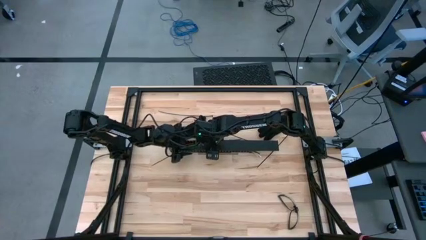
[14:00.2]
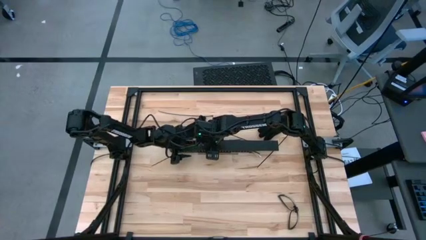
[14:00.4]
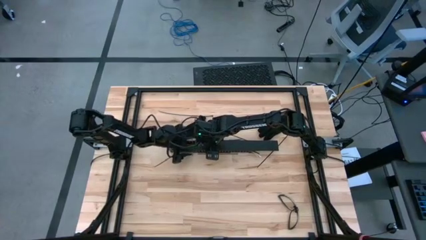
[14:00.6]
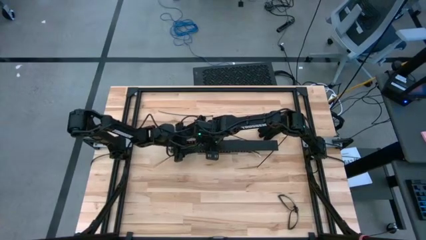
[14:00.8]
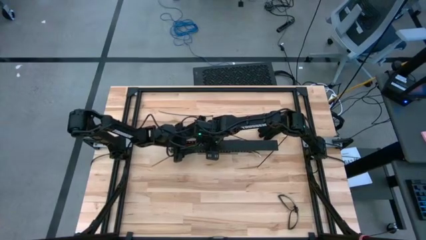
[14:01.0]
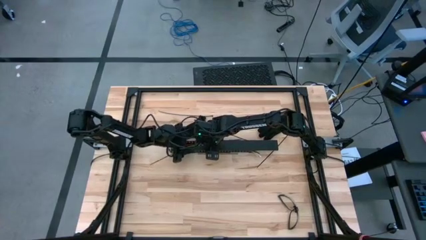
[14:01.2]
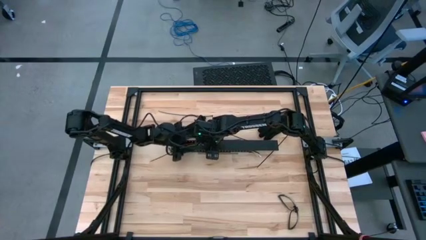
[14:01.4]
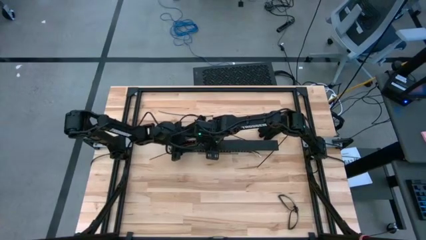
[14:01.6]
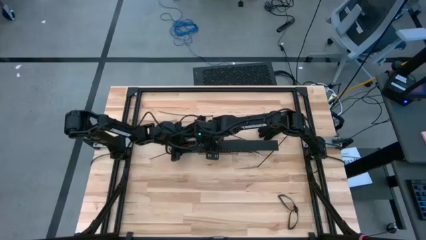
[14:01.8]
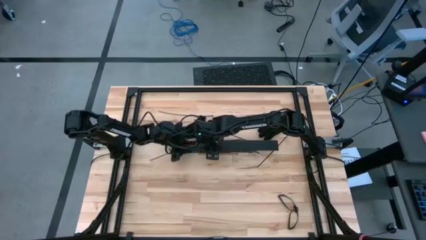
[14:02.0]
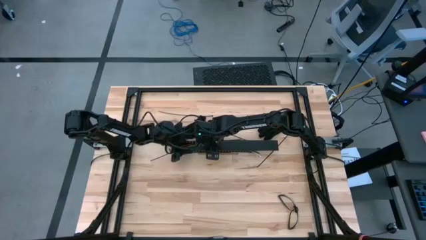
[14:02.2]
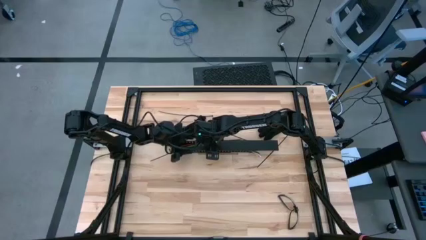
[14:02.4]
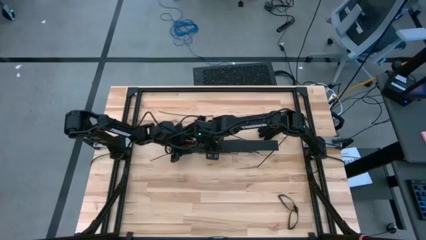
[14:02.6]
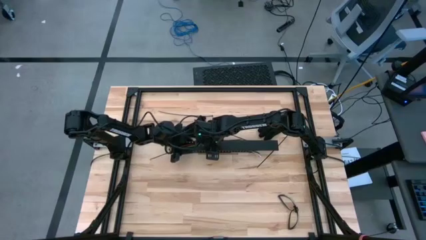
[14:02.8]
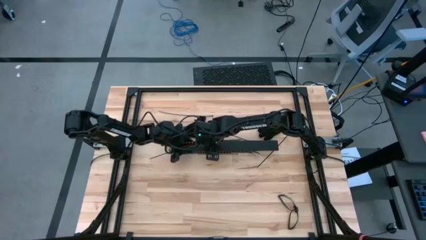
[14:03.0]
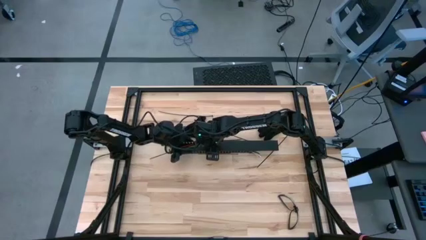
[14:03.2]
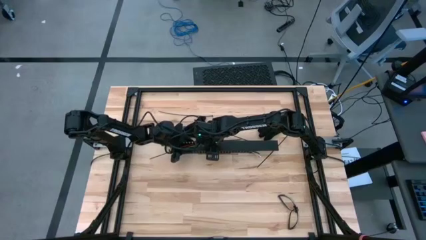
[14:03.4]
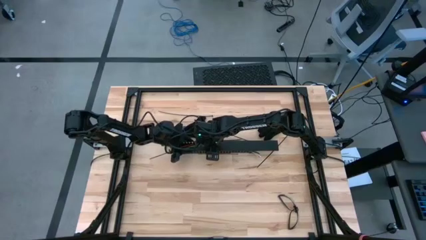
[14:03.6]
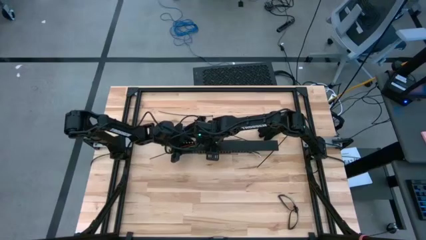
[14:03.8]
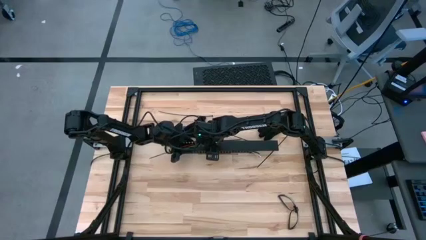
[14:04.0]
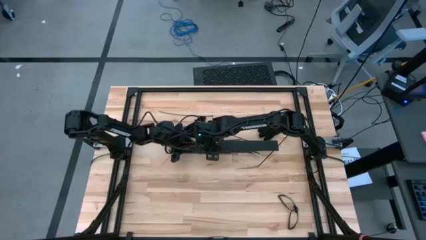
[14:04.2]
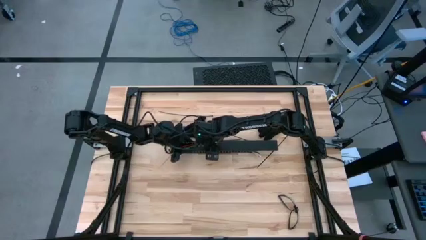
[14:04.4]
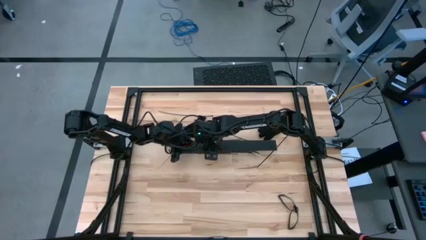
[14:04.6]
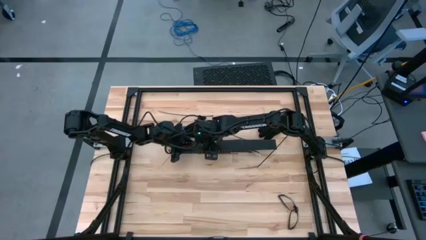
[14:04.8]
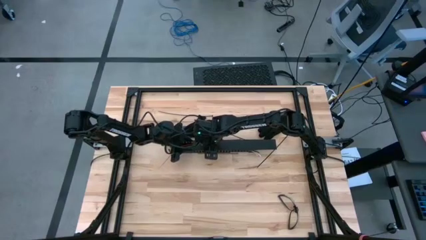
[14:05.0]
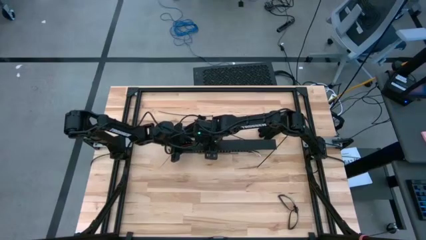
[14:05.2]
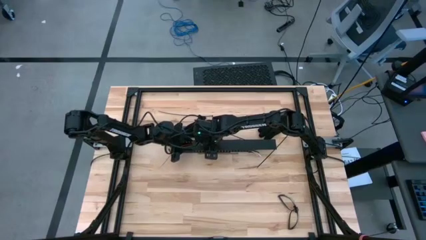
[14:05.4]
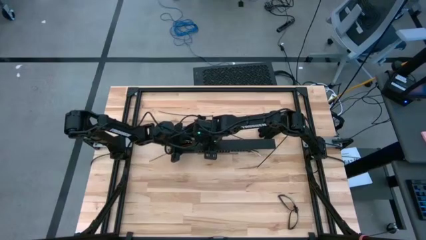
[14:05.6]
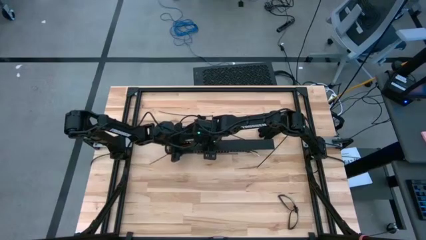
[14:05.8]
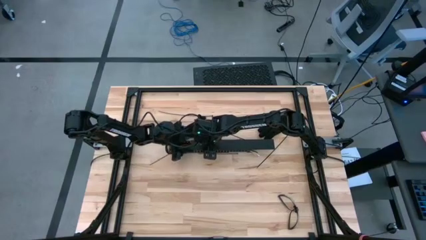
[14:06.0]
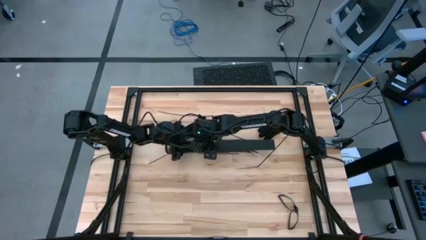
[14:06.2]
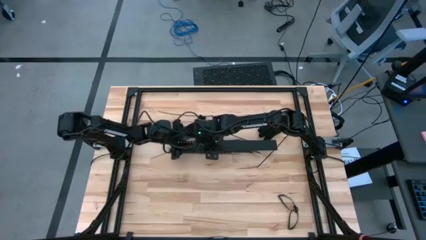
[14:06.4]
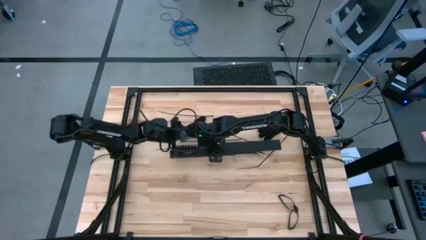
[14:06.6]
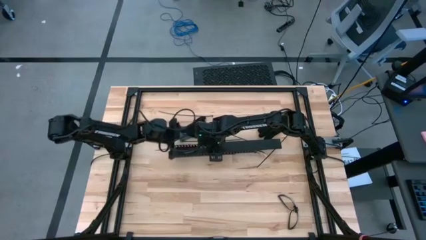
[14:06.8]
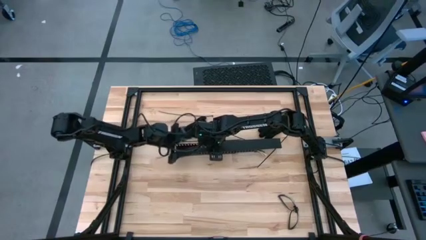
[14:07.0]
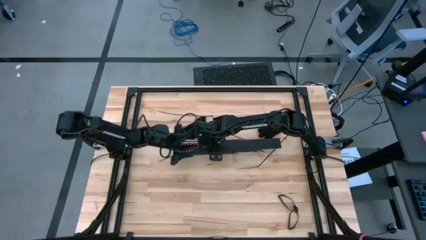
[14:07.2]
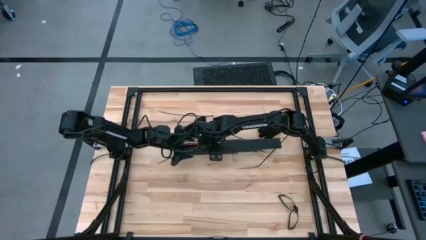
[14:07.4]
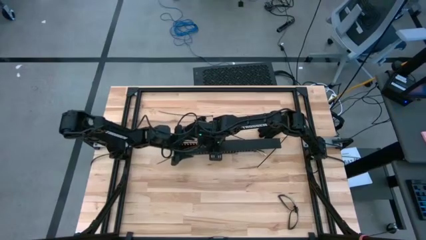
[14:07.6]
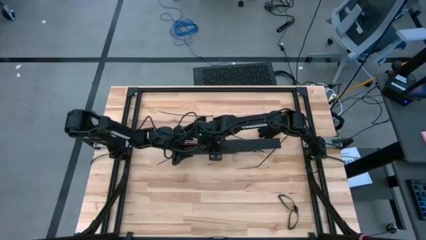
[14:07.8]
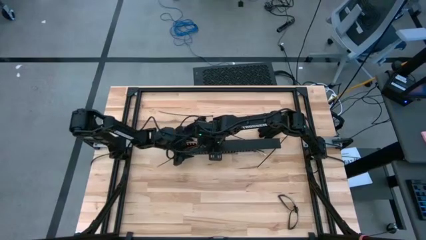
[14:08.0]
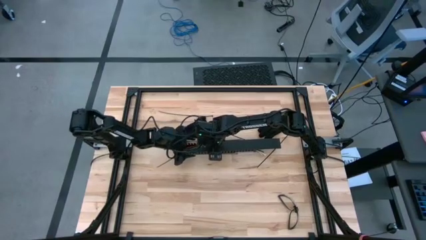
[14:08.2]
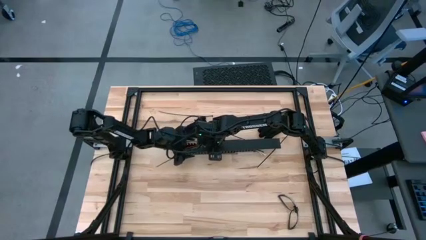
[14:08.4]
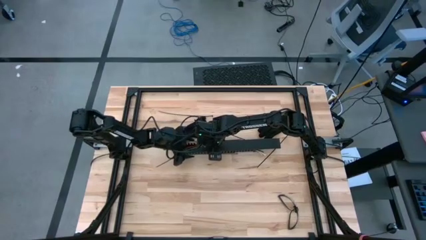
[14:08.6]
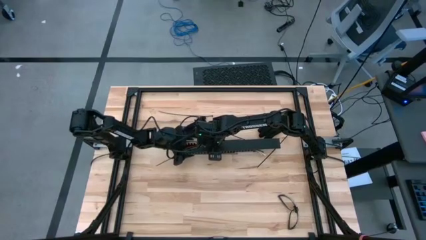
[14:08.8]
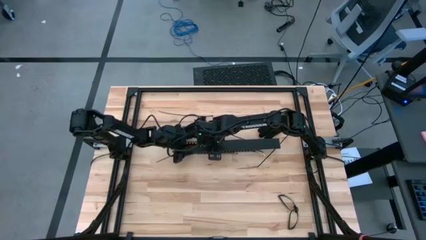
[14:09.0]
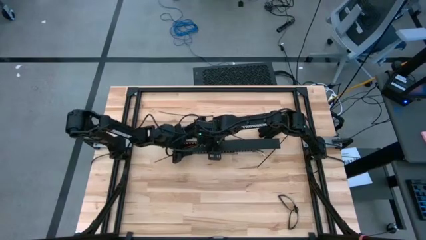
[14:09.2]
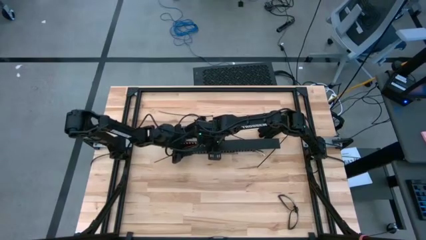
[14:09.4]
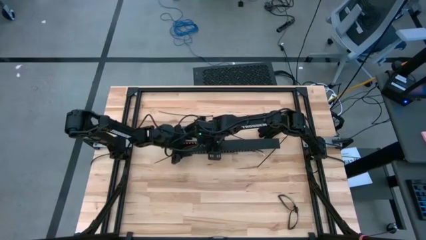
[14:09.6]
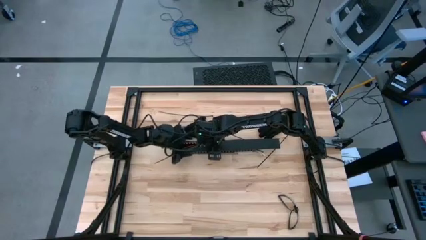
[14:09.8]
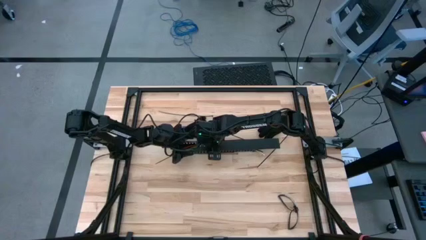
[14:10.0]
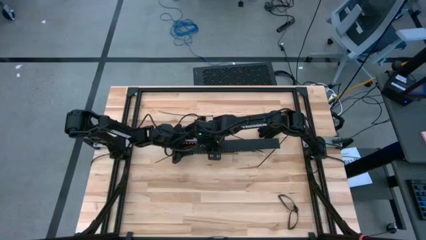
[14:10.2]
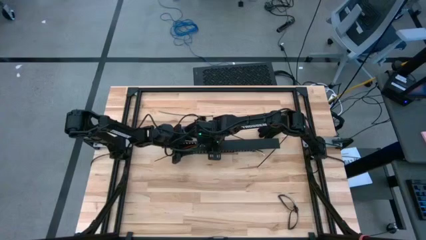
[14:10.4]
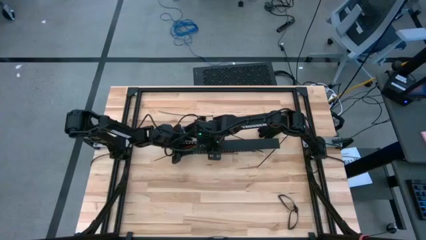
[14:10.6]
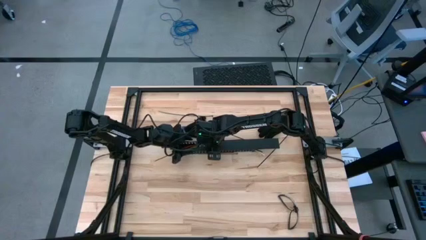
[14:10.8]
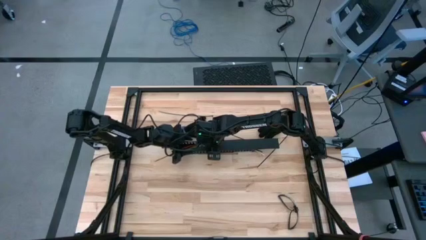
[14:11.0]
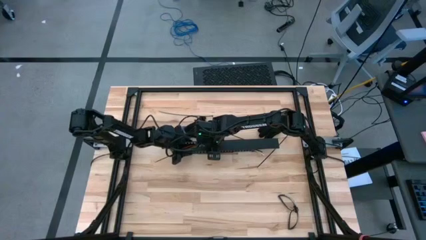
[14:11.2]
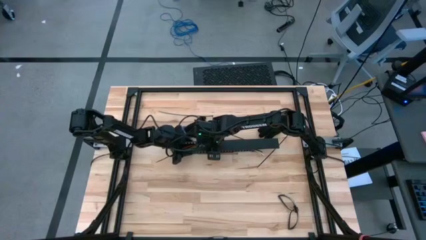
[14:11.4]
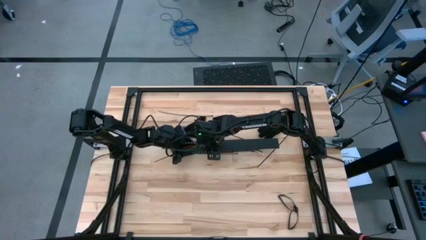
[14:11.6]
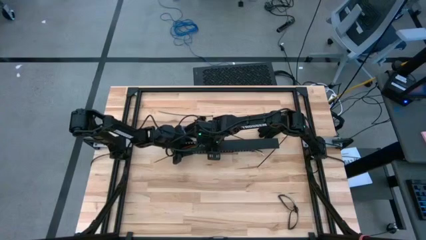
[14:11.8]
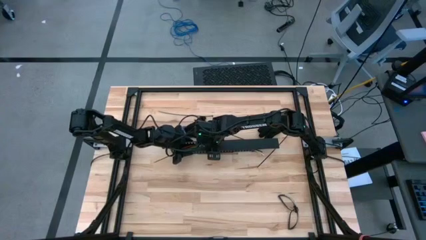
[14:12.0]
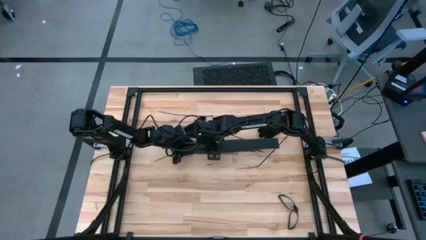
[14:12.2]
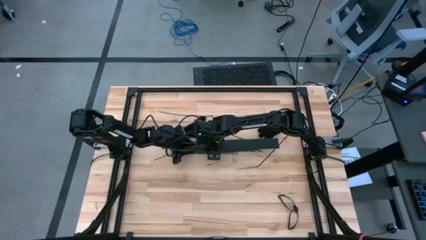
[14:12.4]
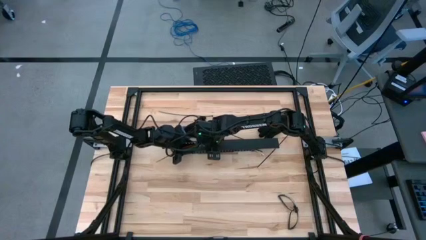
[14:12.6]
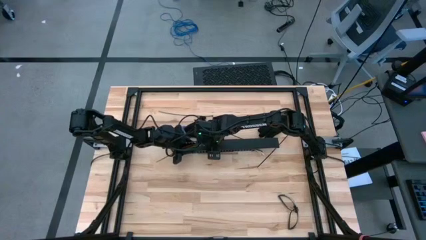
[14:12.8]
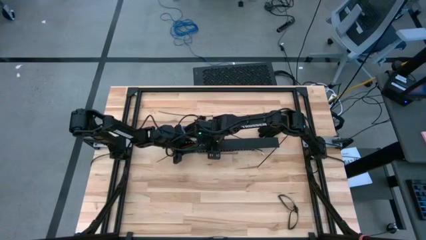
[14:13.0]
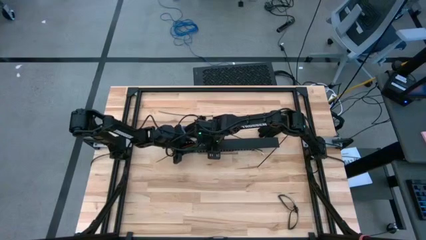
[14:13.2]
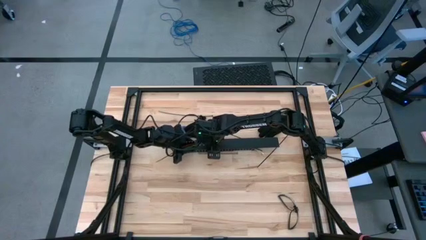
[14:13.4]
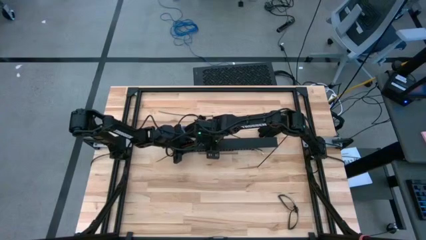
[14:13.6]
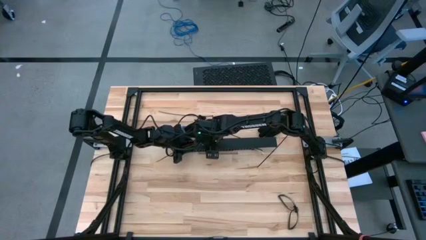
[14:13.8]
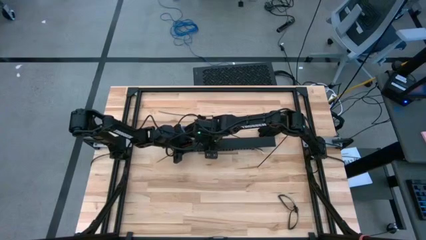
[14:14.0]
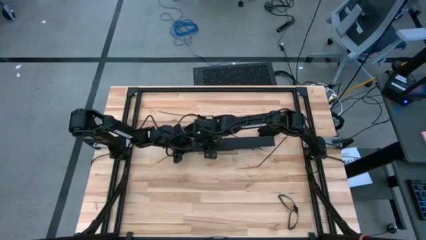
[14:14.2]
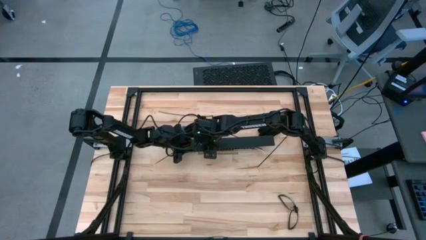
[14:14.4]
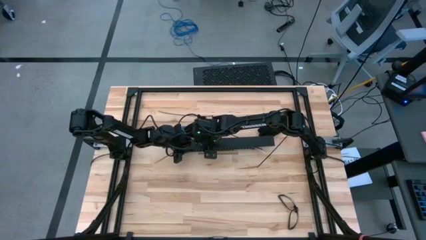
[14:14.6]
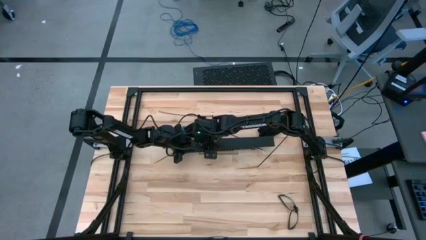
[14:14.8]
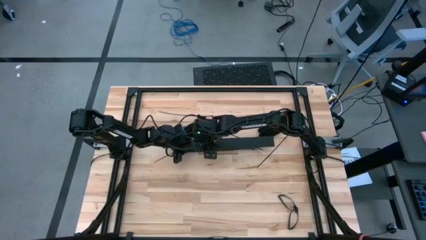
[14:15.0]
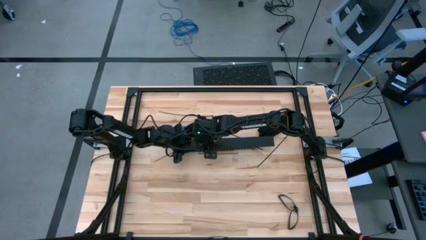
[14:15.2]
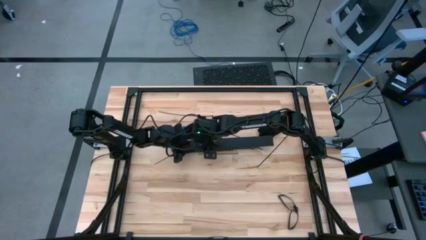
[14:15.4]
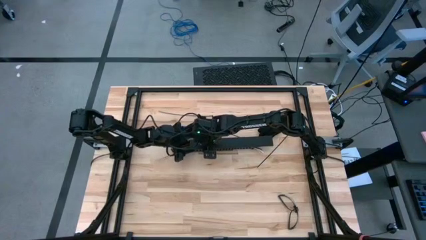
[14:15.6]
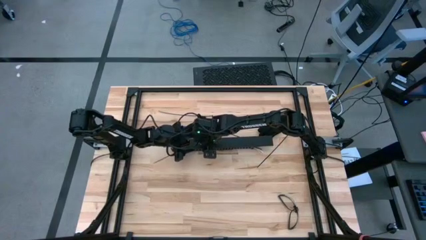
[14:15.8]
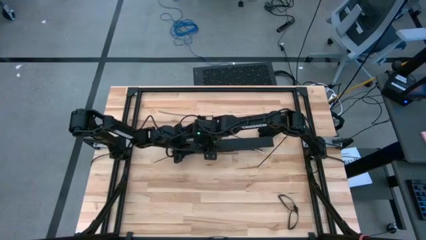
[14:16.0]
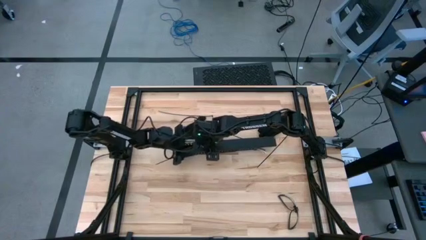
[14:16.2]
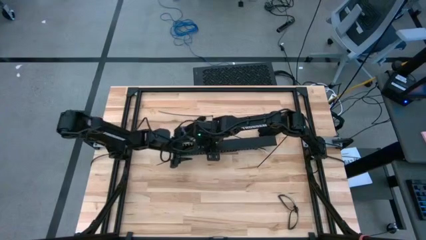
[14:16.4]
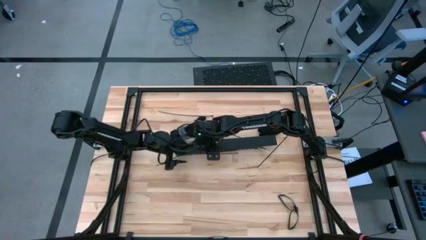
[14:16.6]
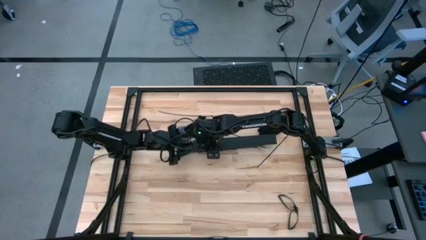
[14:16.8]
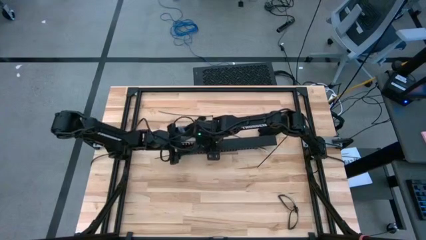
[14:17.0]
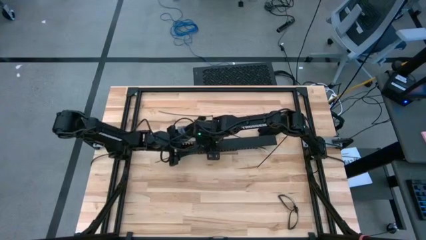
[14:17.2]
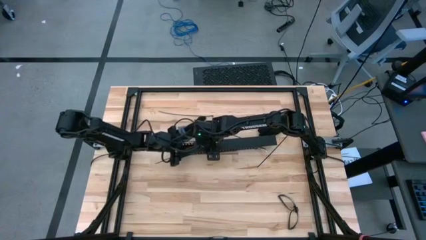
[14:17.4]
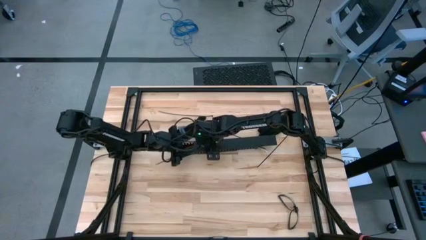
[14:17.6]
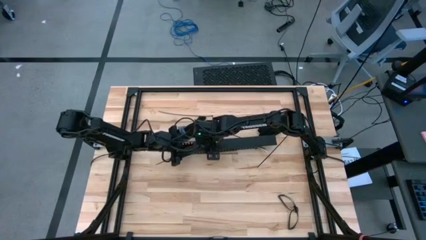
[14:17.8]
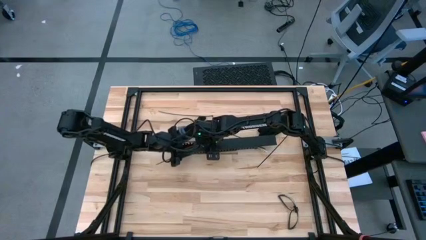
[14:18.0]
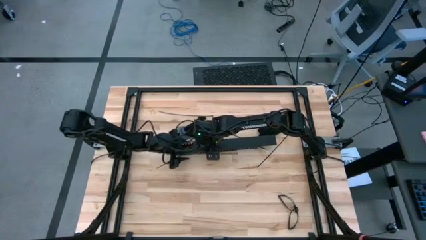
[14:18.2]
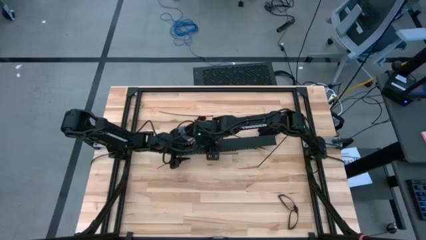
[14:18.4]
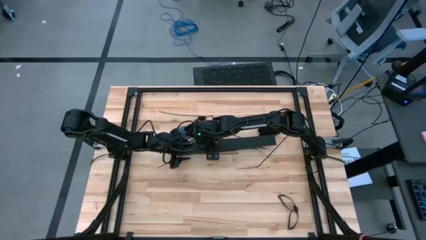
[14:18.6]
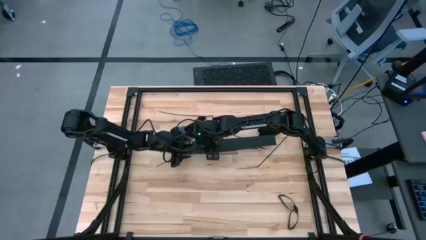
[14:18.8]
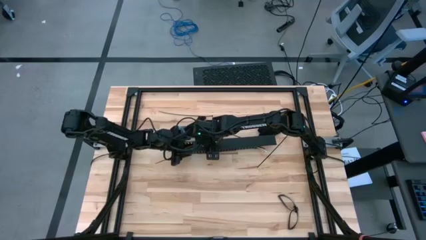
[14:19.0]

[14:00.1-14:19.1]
Task: Ziptie cables
Close the cable duct
